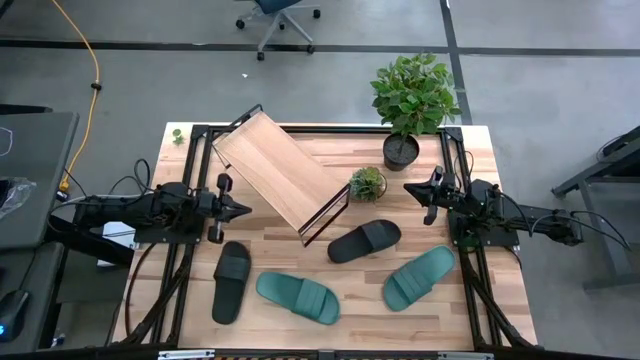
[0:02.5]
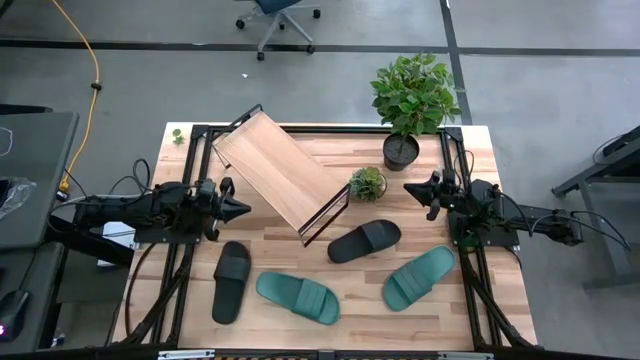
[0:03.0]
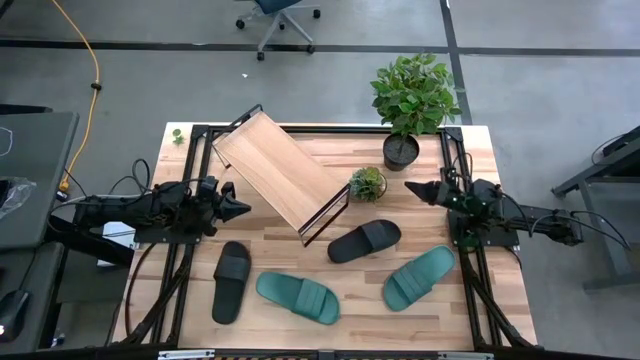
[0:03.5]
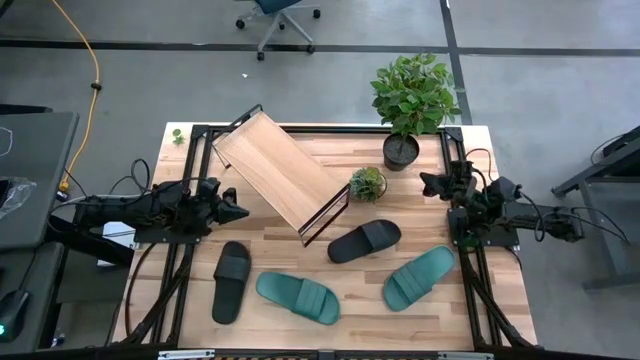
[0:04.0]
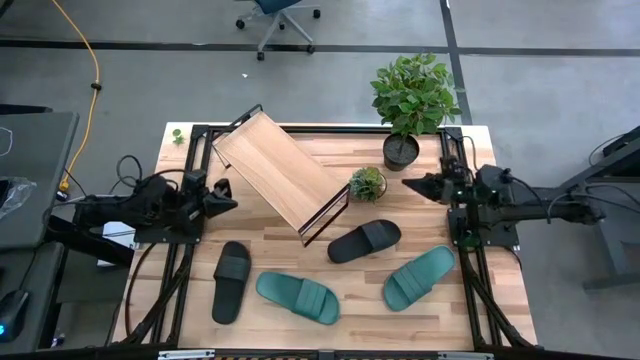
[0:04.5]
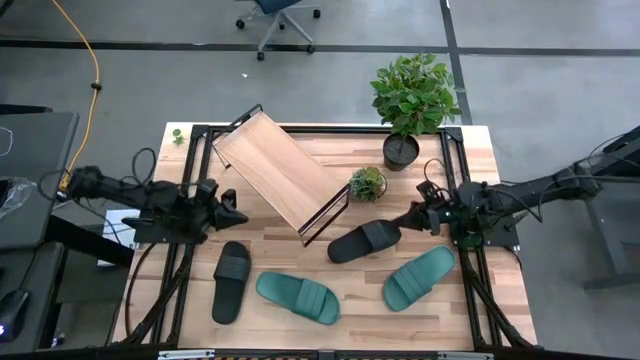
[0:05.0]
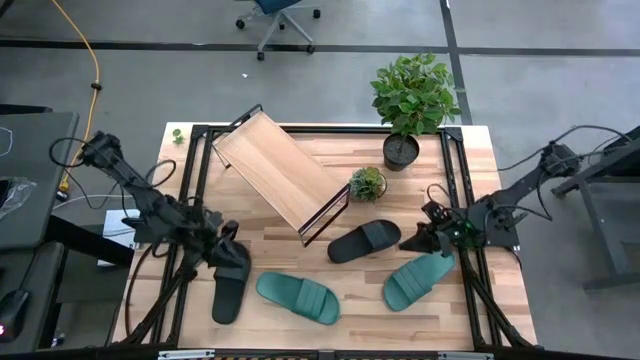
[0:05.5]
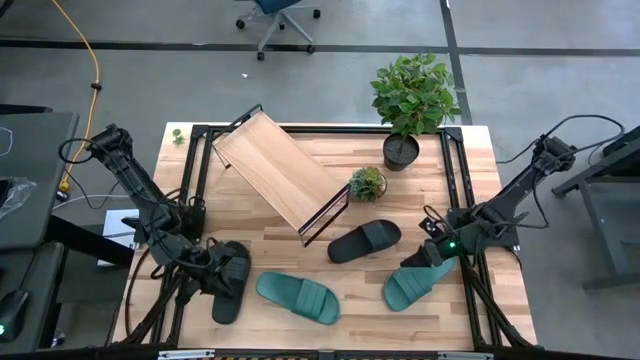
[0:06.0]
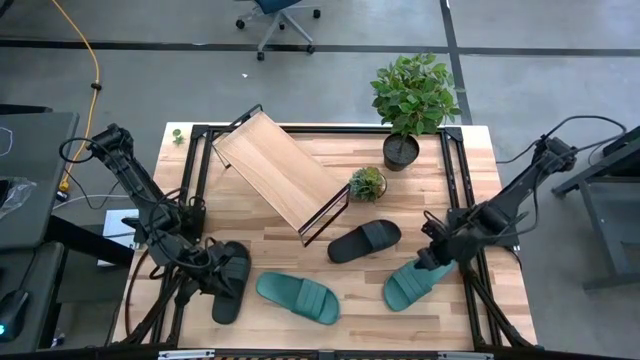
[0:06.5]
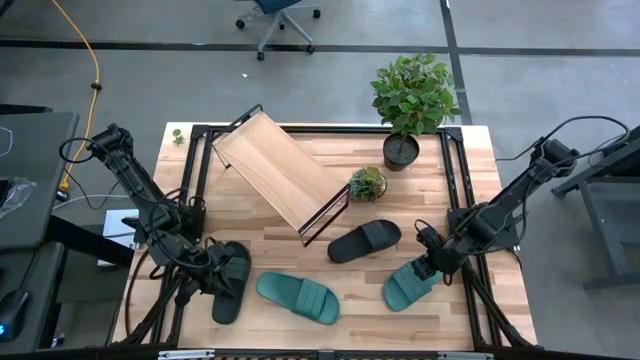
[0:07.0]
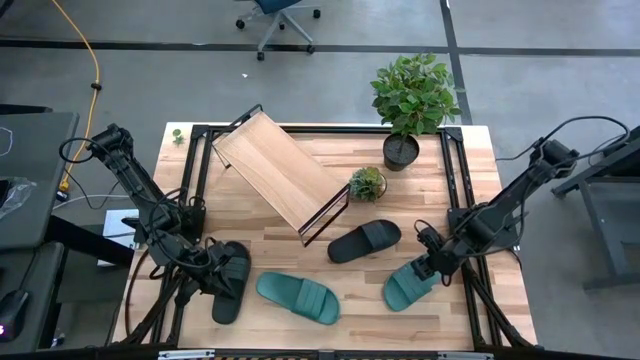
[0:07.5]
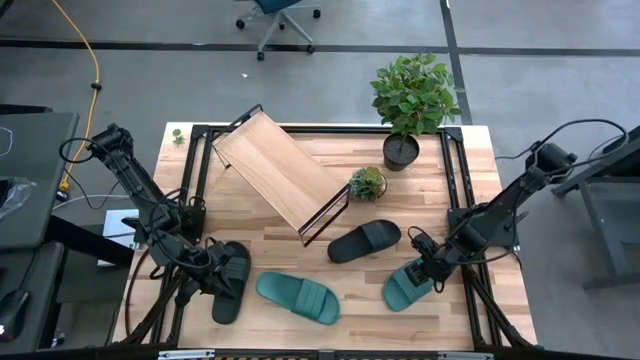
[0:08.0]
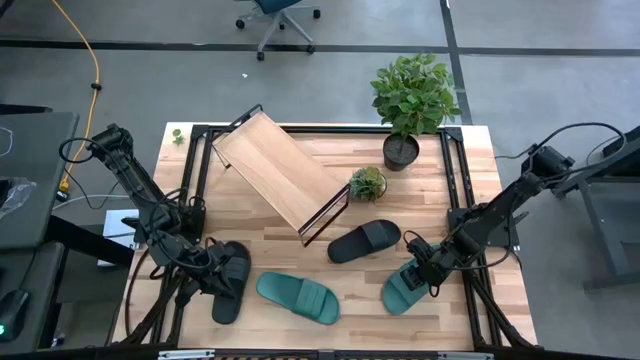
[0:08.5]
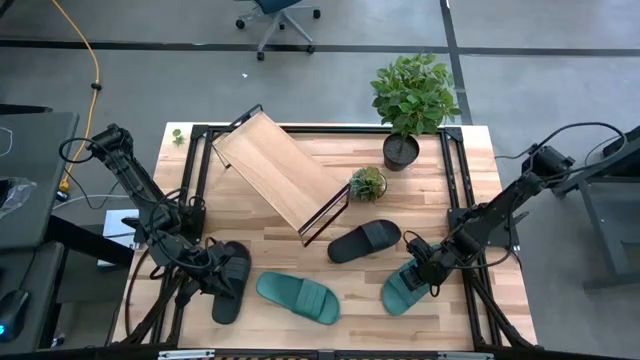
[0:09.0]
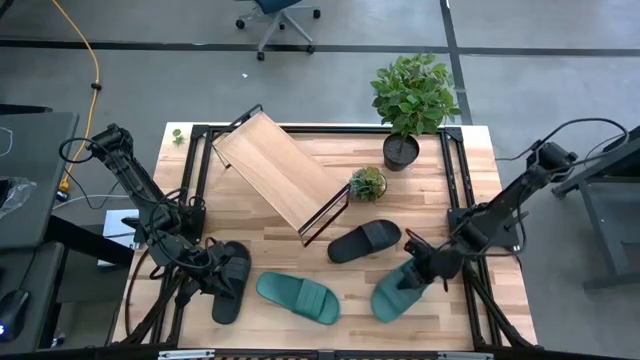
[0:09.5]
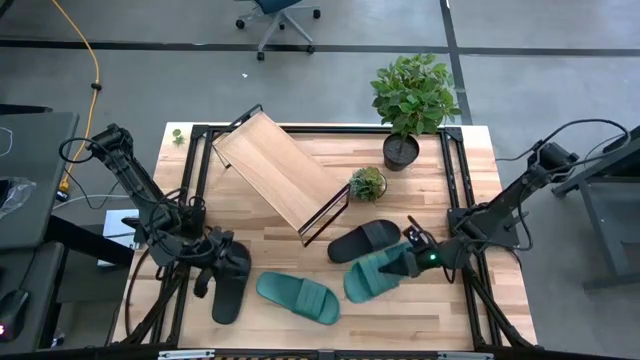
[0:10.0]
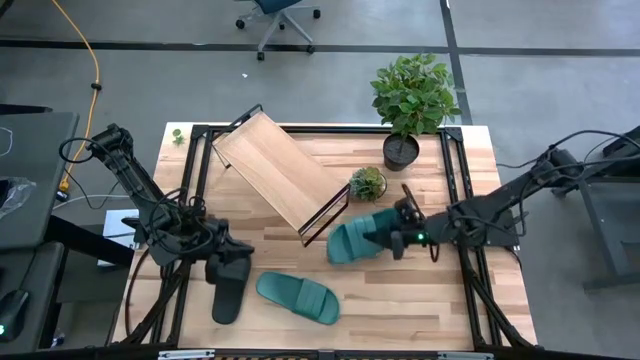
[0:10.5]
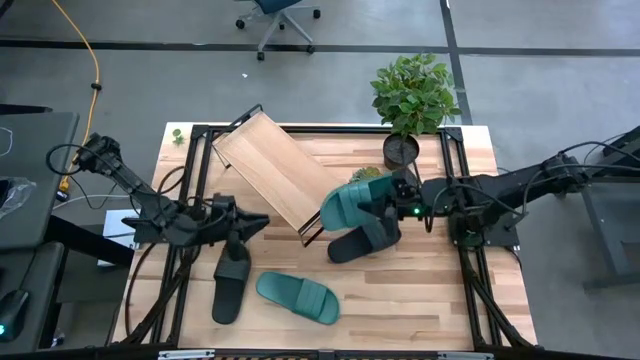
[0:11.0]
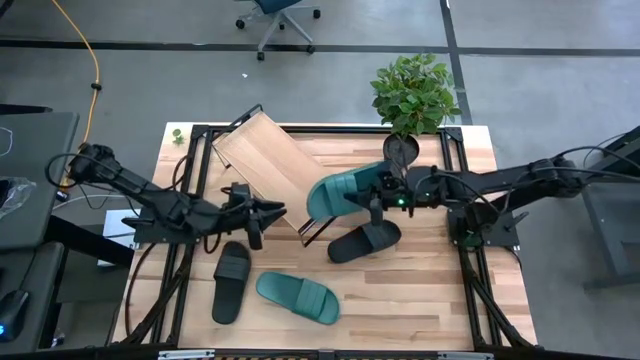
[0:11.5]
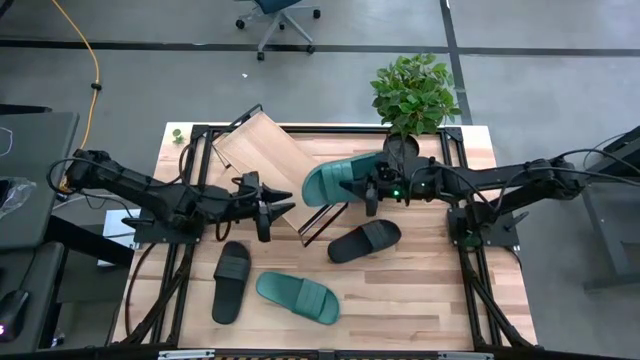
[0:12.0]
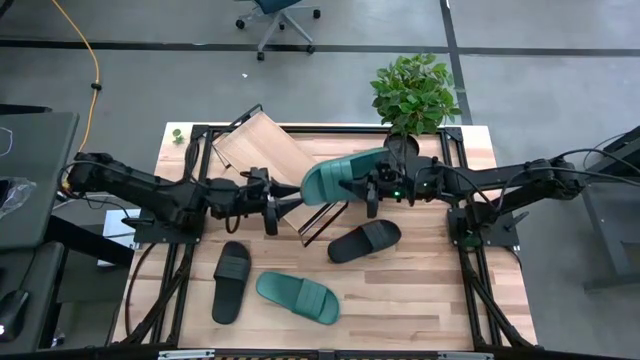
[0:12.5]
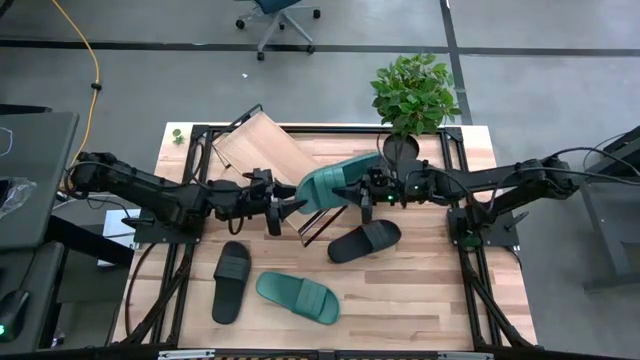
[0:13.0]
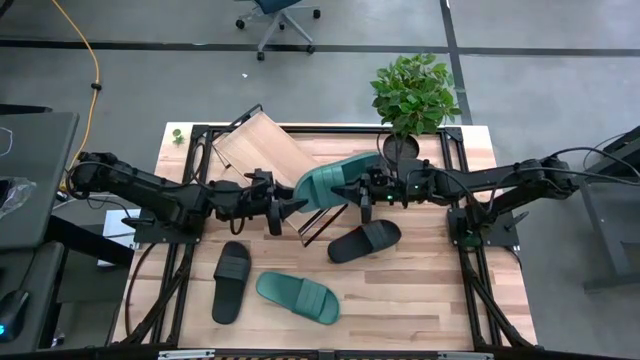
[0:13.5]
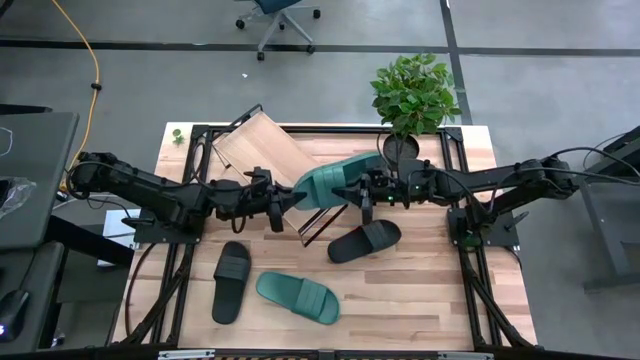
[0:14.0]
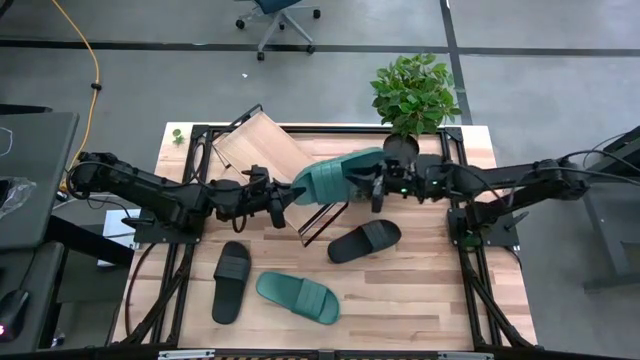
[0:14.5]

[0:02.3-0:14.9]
Task: Pick and place slippers onto the shelf
Put the right green pair of slippers on the shelf

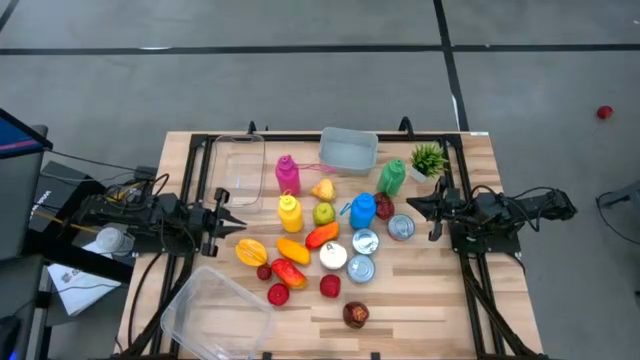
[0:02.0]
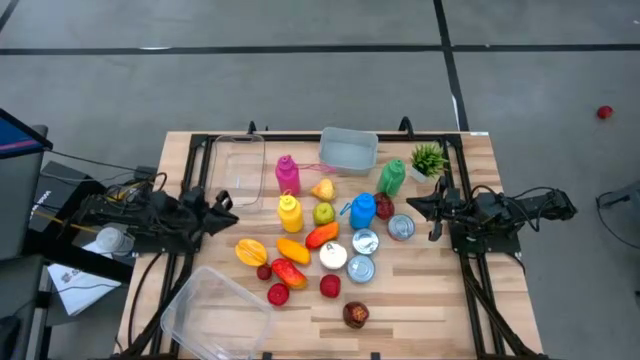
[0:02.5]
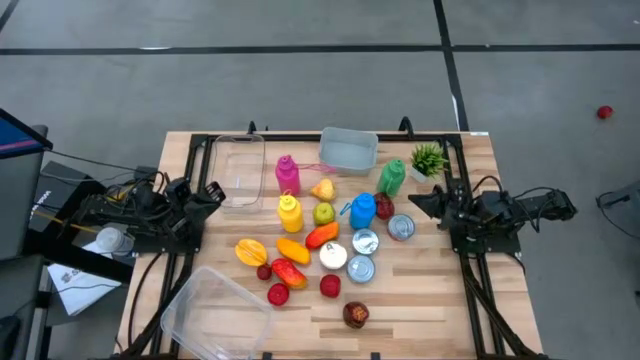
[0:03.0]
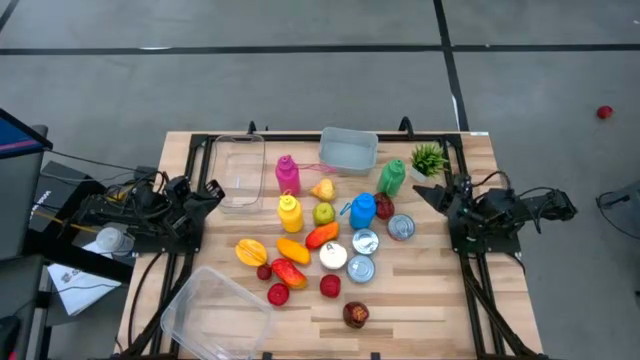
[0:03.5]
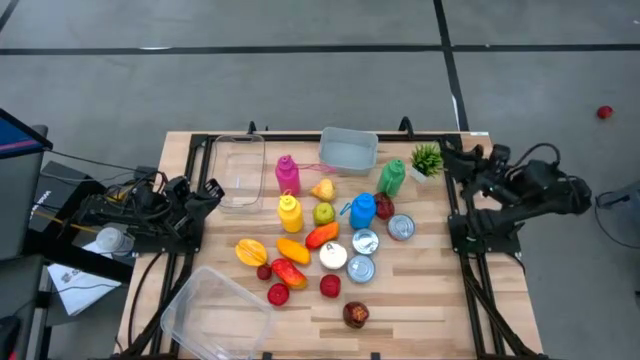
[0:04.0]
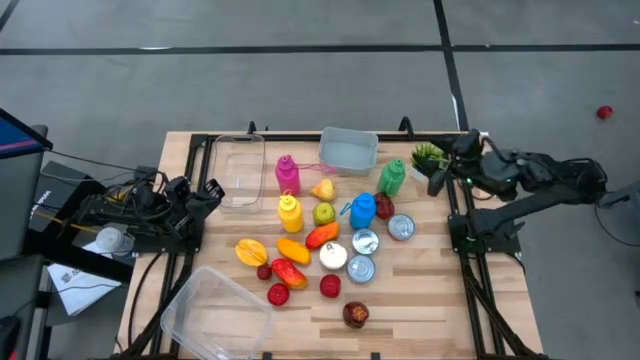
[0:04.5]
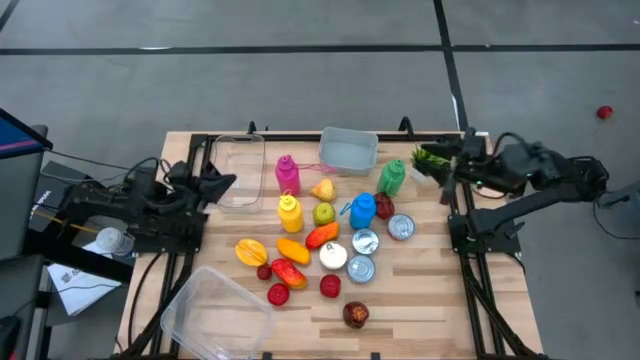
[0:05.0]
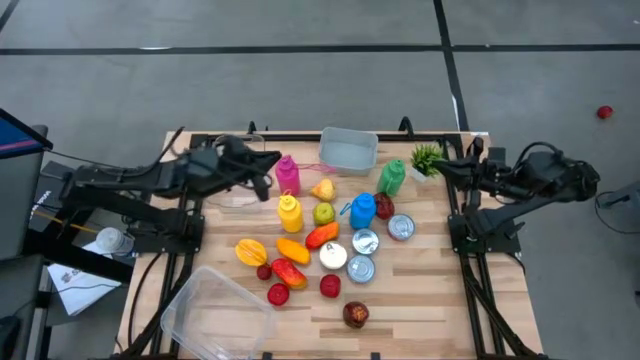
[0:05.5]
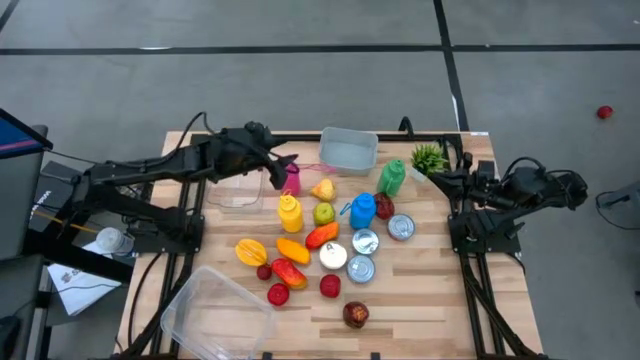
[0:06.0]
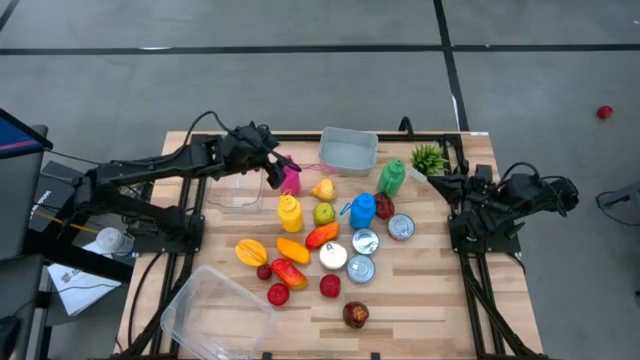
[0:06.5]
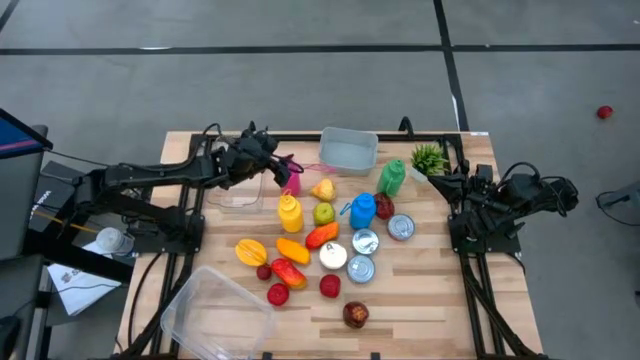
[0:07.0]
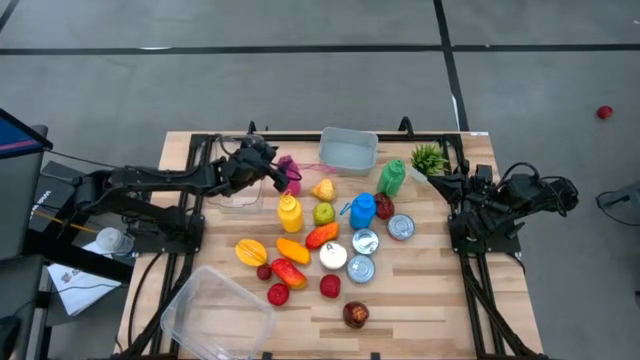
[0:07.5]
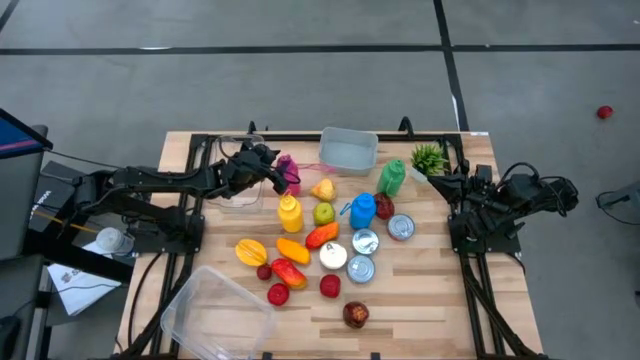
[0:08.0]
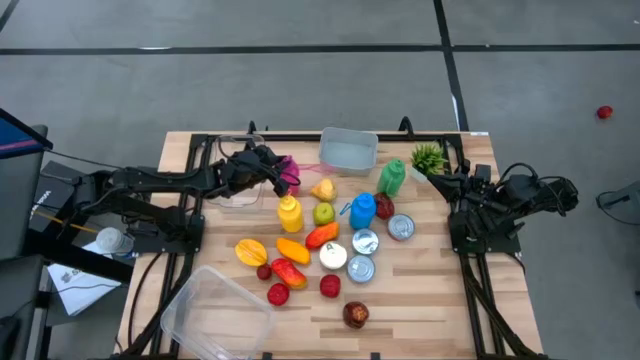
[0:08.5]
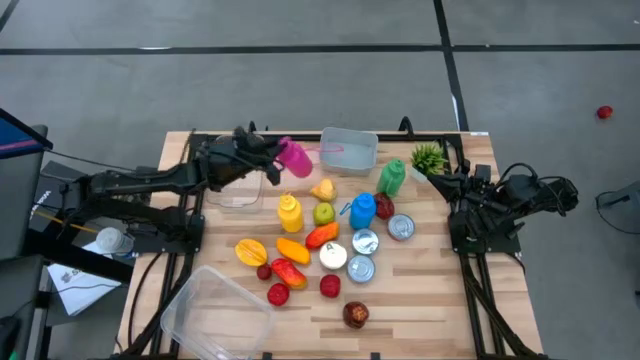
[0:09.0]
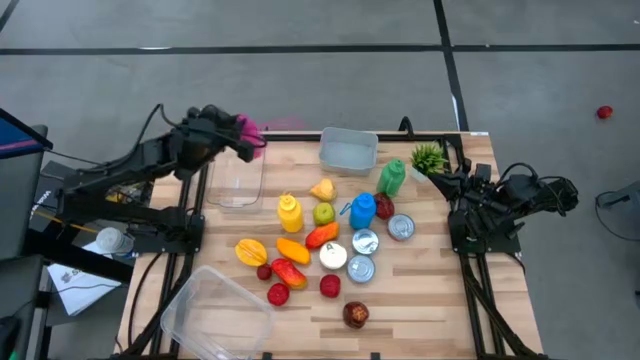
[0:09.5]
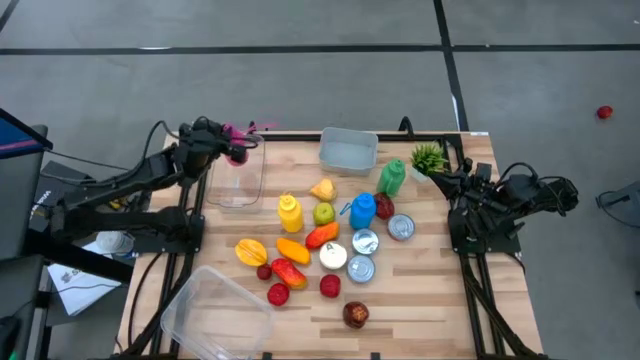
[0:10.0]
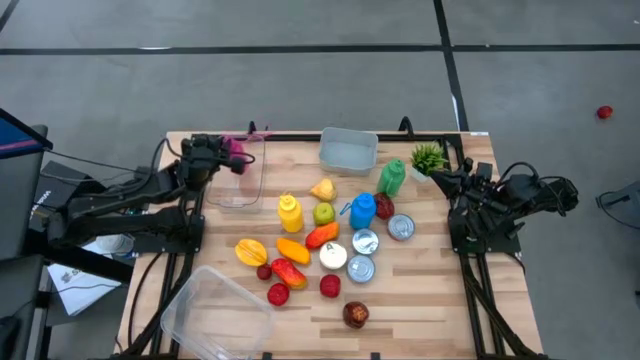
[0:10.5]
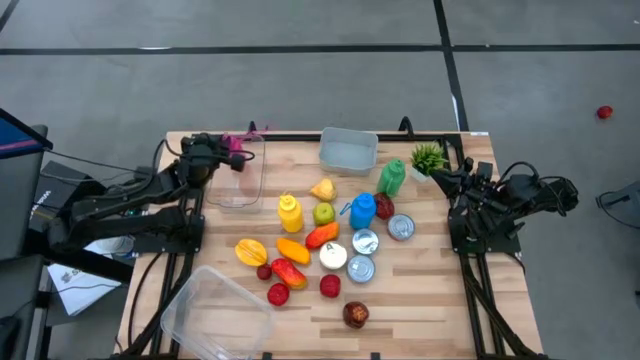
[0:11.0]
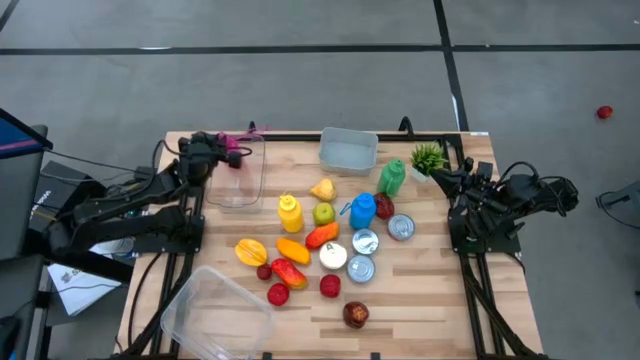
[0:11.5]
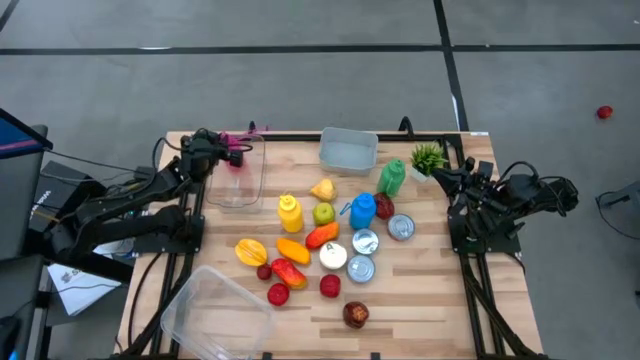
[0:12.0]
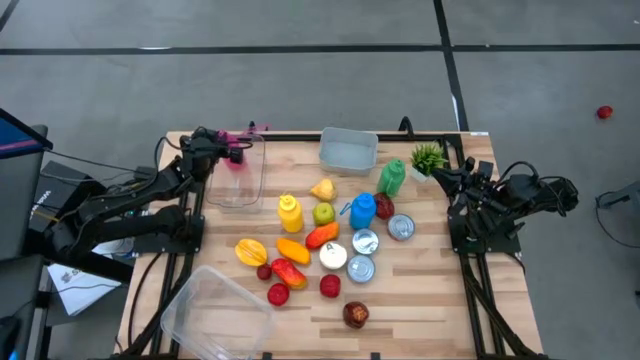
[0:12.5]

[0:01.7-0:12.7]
Task: Pick & Place Food Item
Put the pink water bottle into the transparent bin
